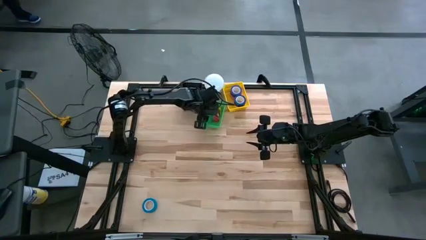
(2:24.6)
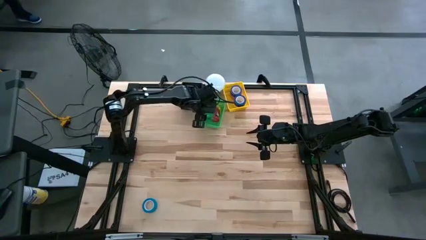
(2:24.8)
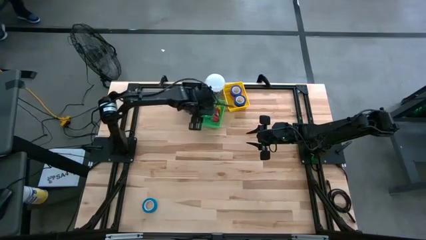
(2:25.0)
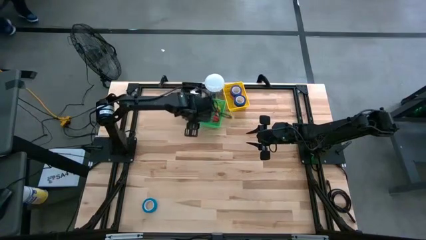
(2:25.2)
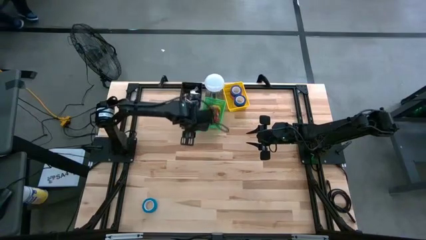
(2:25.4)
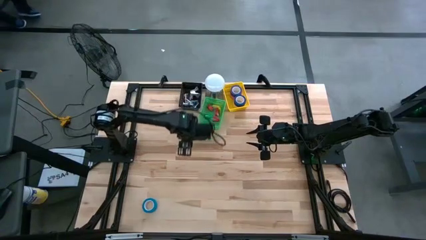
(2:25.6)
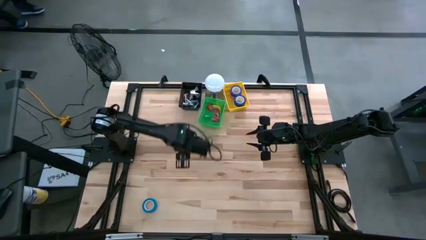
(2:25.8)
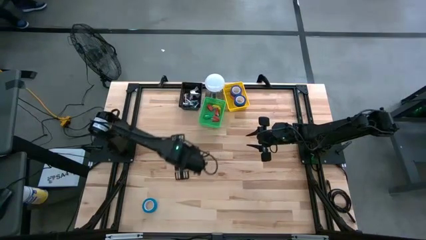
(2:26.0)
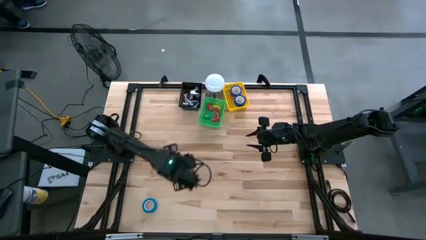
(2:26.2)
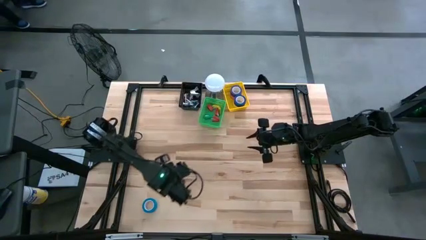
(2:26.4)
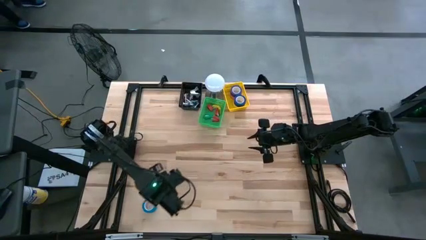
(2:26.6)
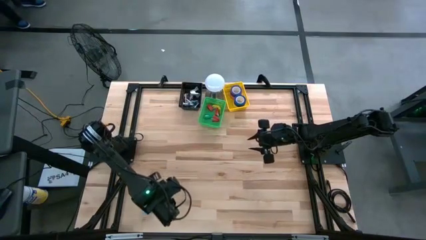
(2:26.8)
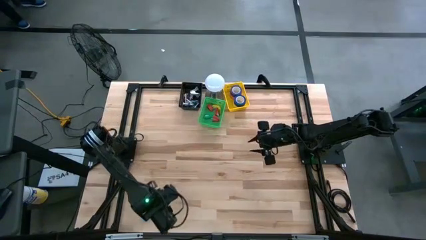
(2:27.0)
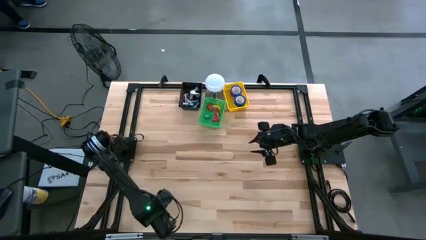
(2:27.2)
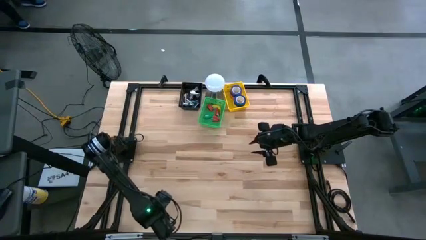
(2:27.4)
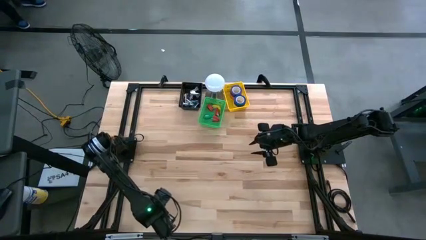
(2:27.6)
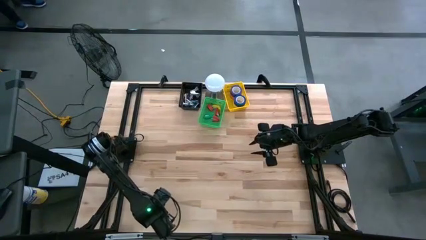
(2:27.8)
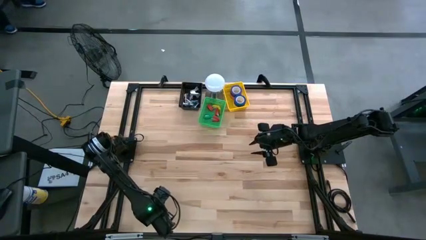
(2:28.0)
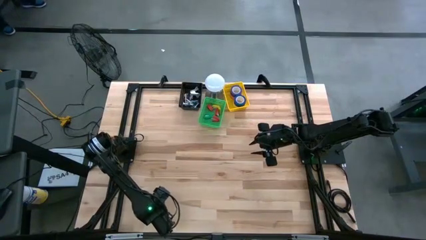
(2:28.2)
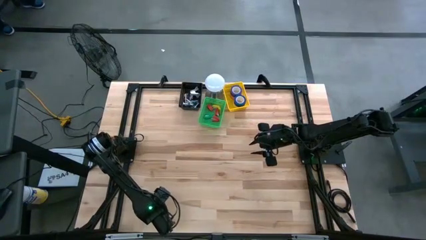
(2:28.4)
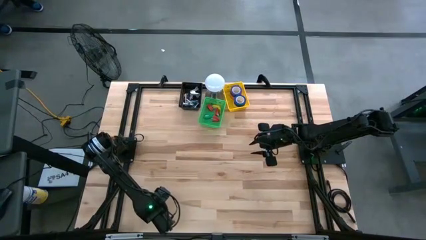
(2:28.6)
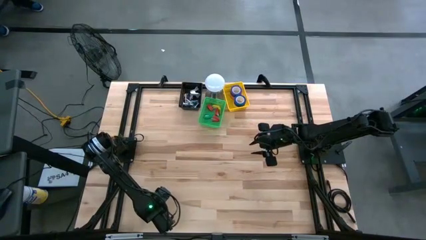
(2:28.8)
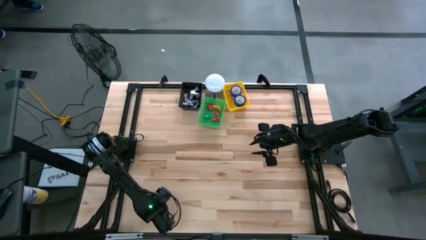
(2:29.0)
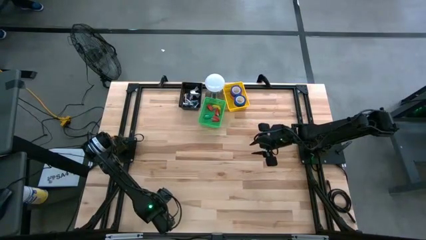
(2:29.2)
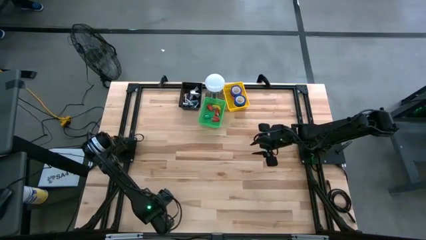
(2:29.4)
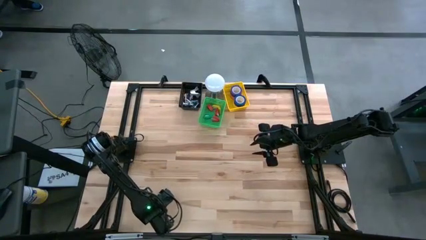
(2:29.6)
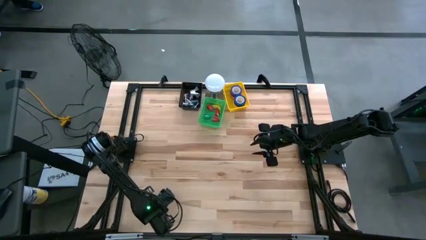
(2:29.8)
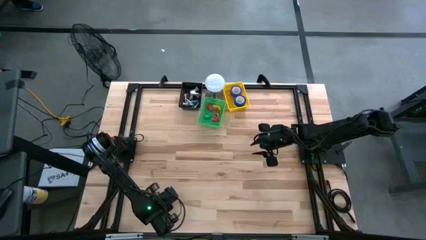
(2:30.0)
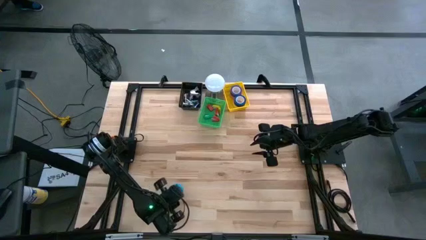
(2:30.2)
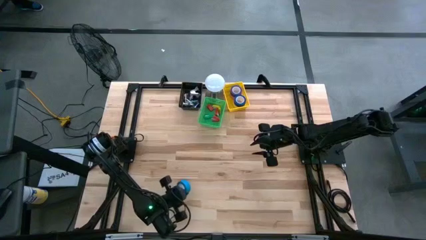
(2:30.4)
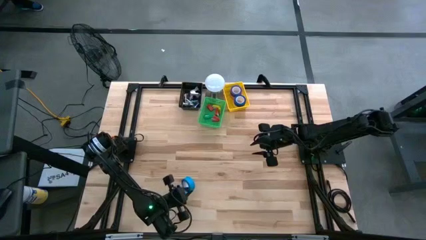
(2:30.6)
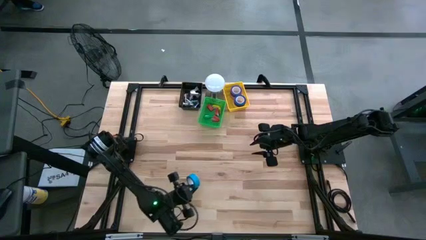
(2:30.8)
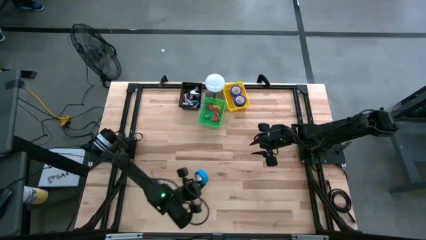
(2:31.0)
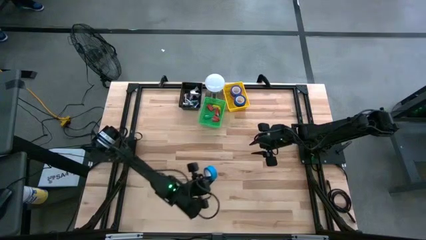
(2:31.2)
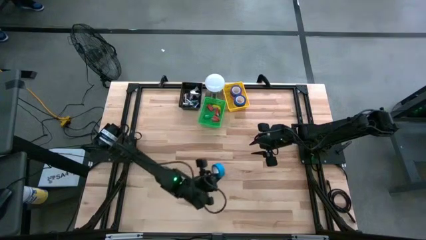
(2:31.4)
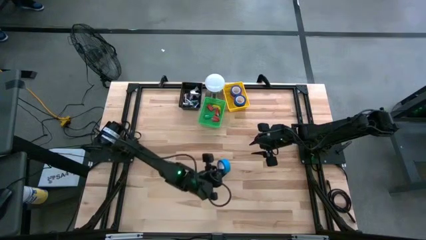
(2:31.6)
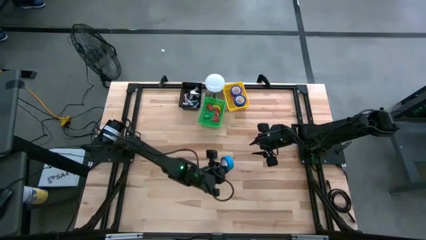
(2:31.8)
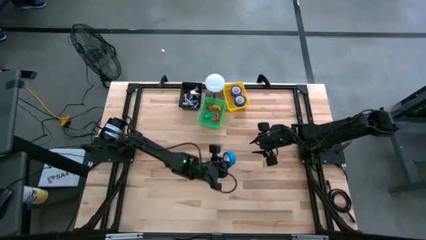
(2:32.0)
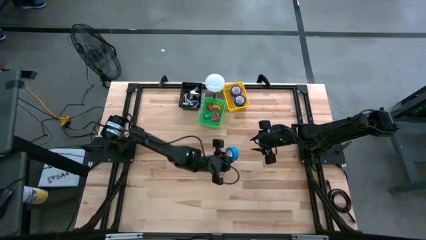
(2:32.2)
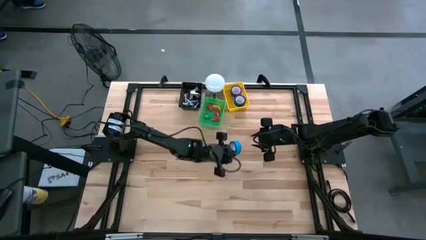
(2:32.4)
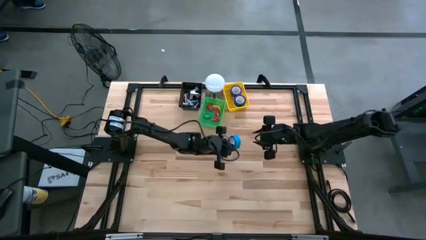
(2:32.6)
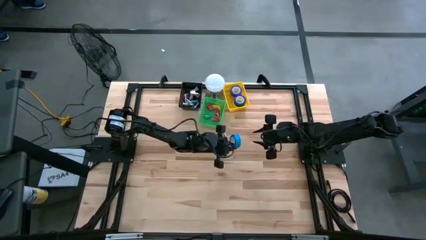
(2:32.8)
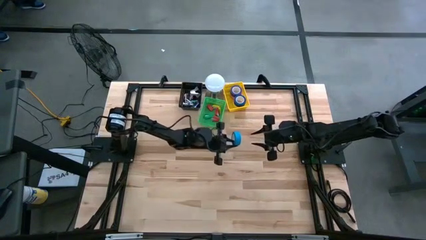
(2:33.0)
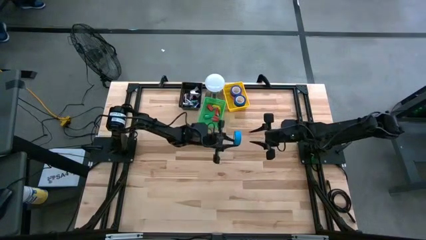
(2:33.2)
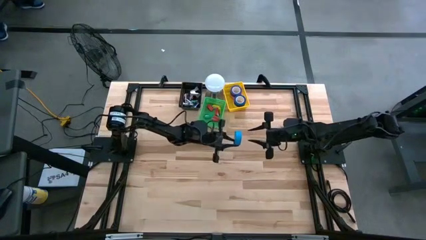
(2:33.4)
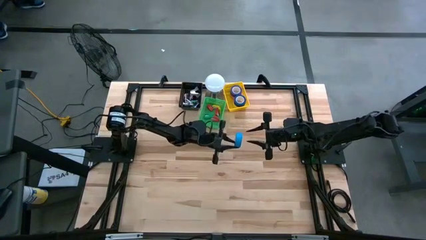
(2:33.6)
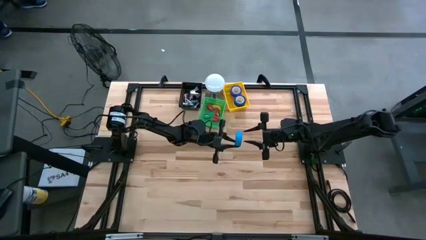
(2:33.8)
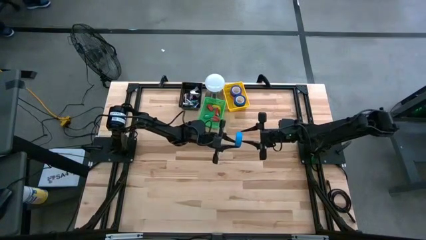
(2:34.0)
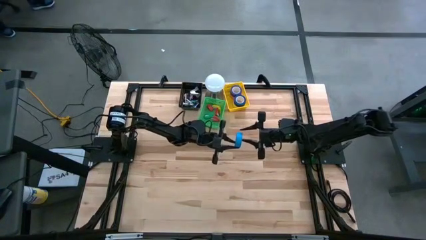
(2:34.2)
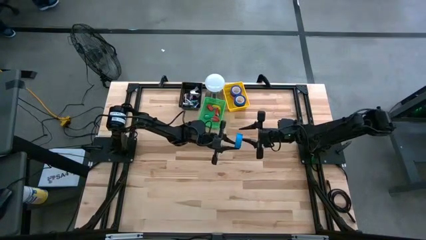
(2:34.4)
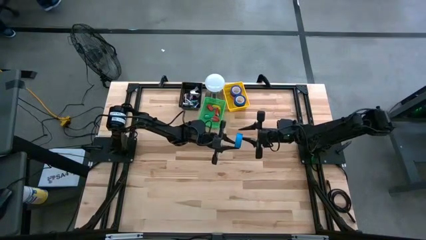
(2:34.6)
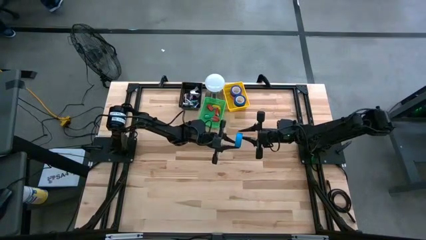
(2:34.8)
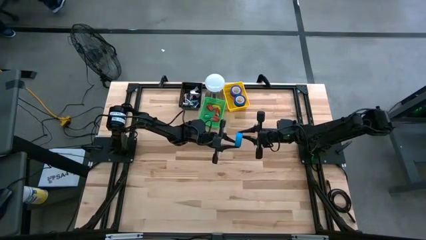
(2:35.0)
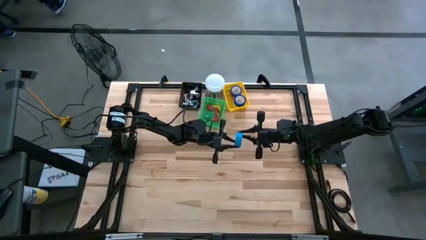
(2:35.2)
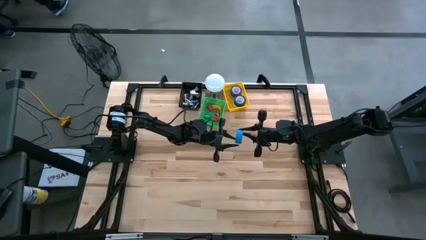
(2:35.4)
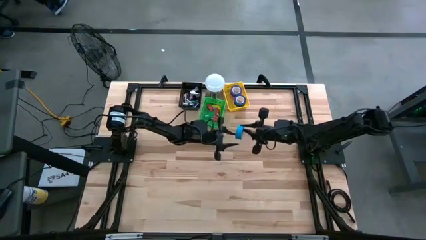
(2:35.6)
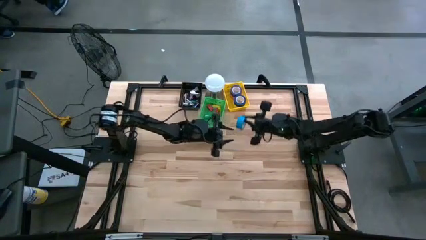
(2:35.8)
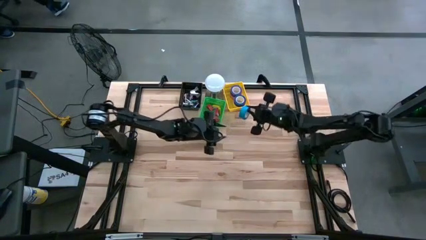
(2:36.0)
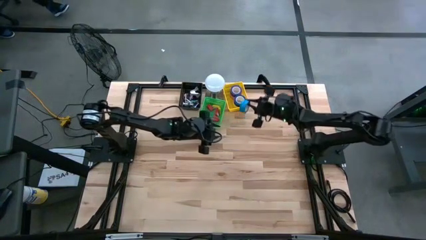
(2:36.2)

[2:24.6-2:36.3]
Task: Pick and place Stapler, Stapler remover, tape
Put the light blue tape into the yellow bin

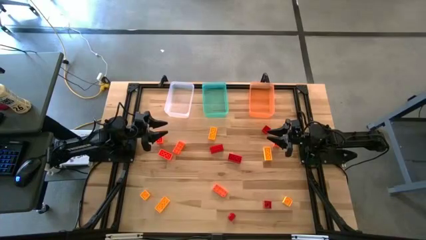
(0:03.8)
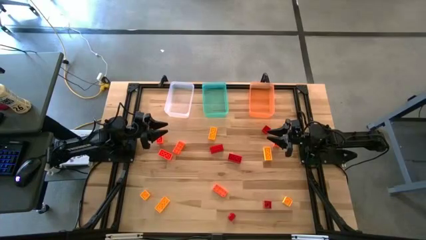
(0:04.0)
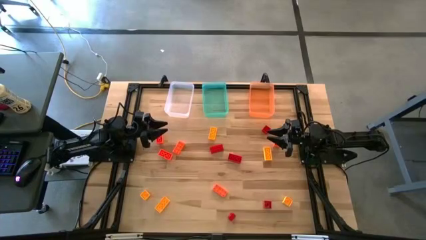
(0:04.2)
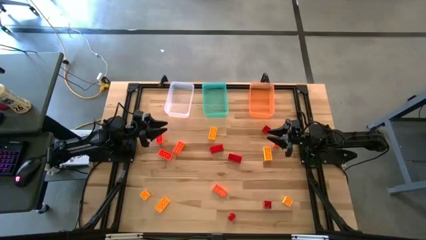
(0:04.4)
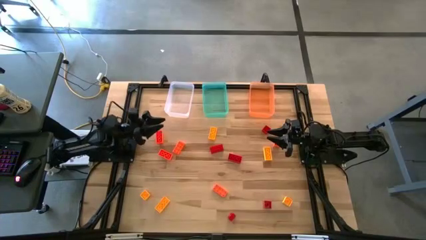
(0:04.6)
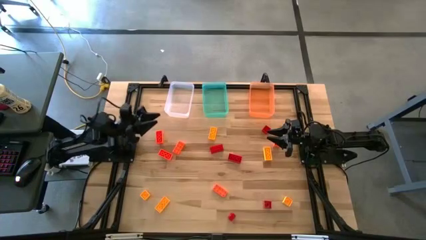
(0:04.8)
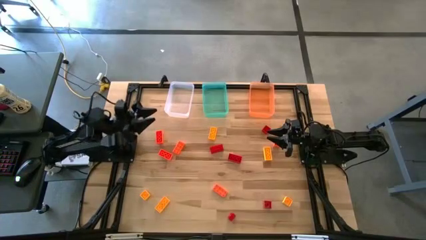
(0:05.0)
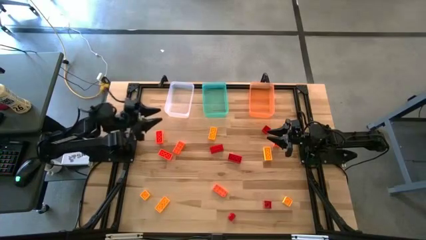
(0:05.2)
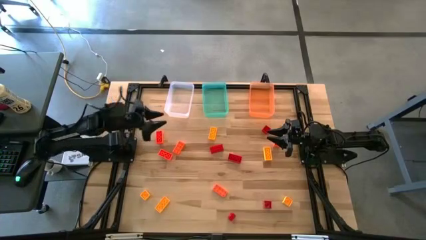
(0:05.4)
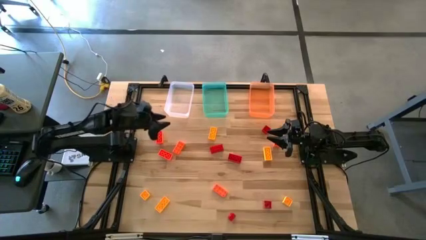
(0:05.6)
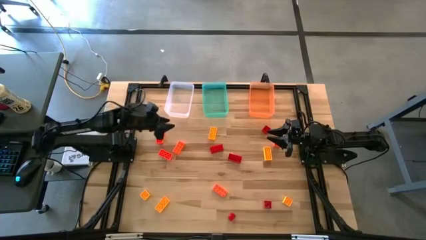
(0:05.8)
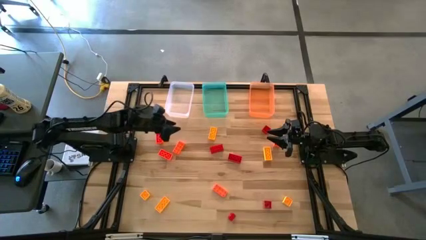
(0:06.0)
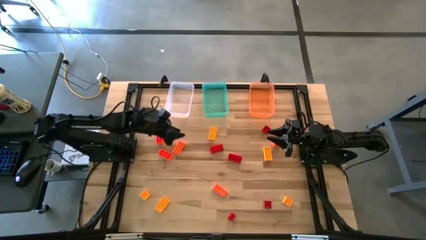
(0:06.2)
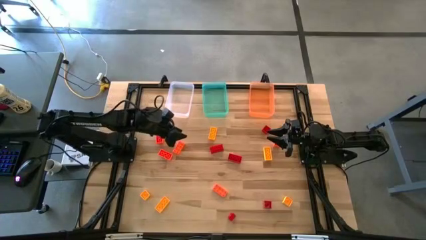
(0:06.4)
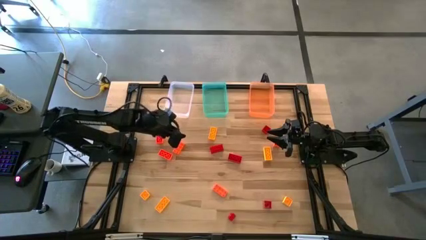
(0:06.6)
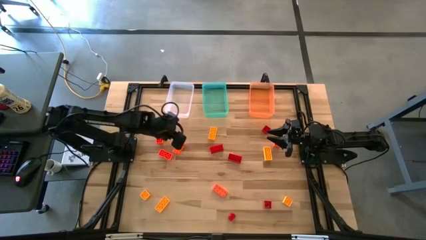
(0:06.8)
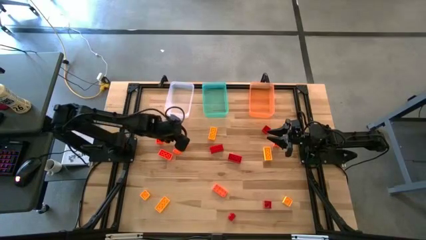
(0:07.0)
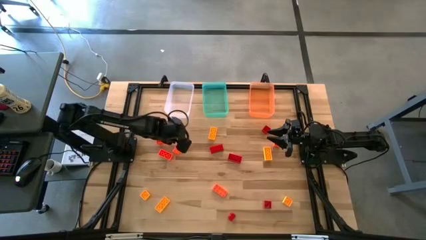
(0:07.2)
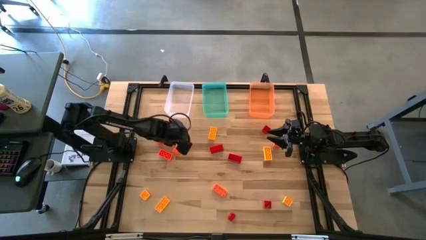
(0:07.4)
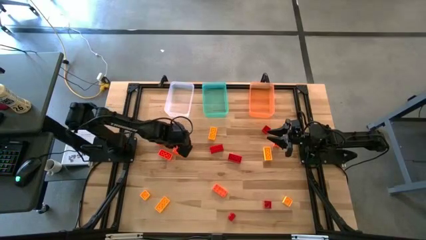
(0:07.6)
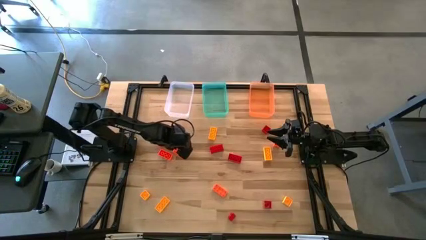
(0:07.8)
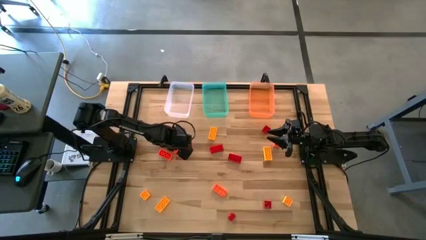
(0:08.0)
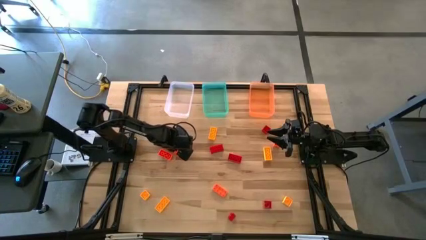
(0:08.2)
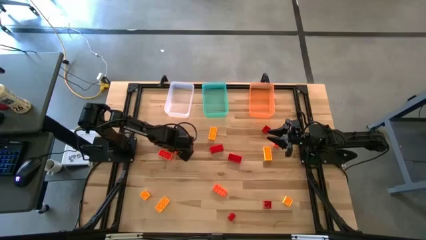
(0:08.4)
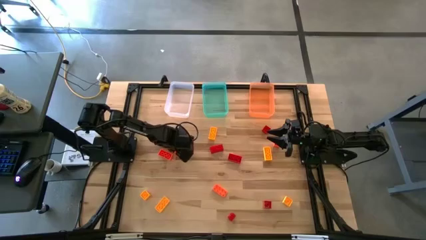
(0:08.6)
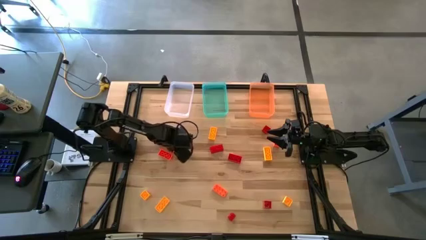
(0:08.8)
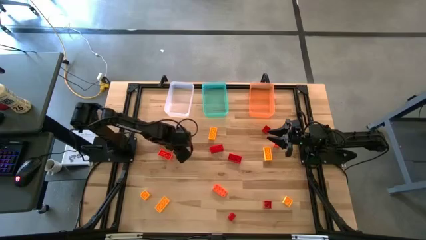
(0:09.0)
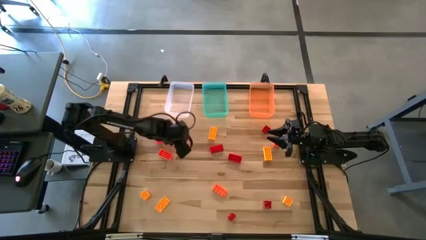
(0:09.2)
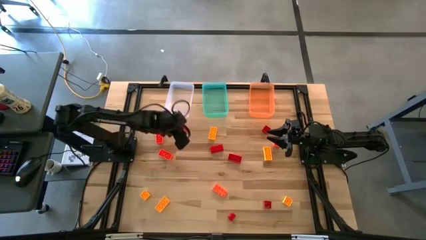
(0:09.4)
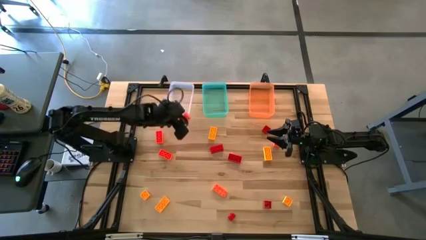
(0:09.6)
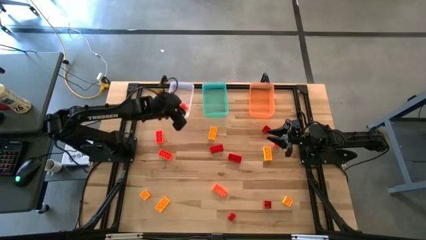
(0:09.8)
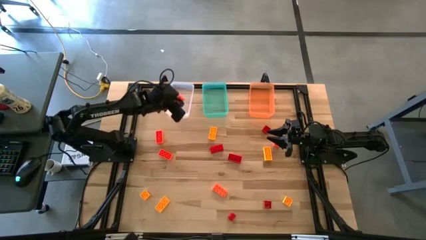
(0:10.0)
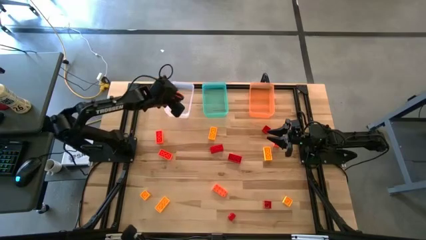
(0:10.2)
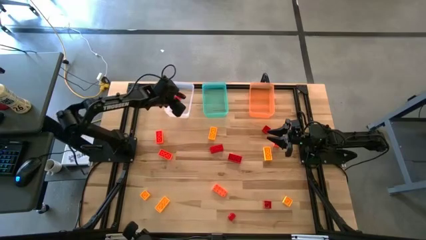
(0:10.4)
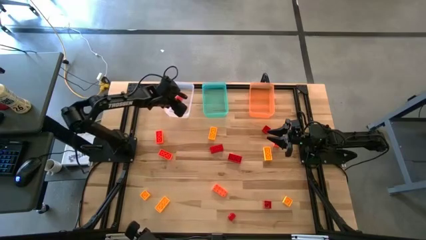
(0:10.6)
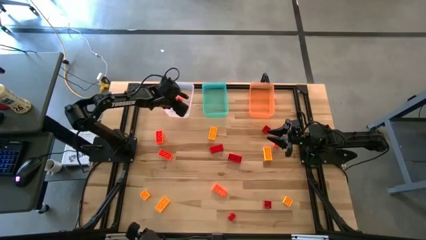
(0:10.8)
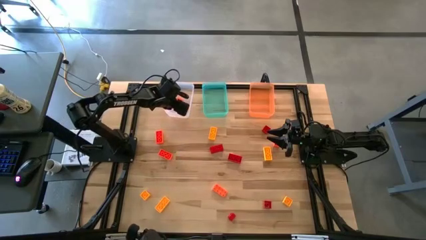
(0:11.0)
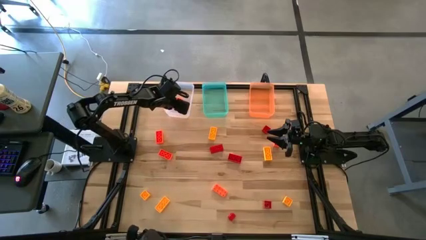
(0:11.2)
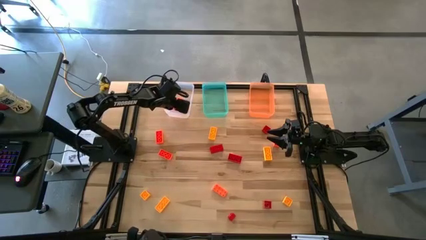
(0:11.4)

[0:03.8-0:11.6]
Task: Sort & place blocks by color
Put the orange game piece into the transparent bin
